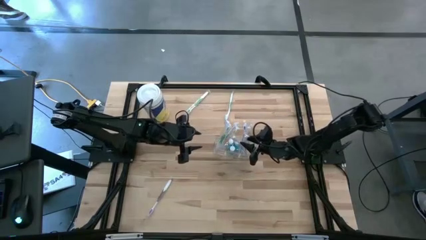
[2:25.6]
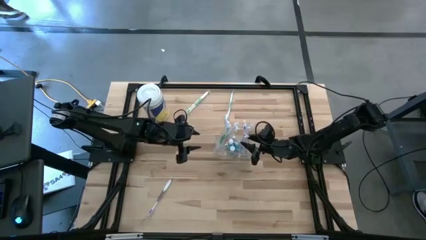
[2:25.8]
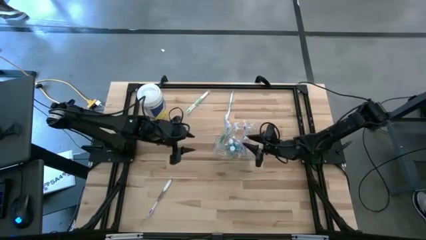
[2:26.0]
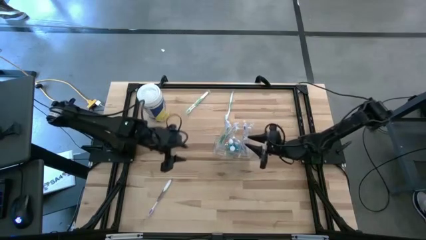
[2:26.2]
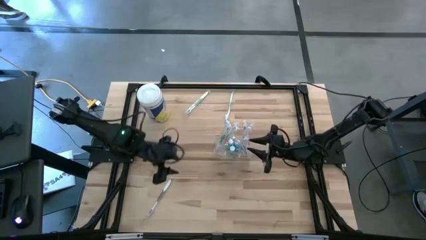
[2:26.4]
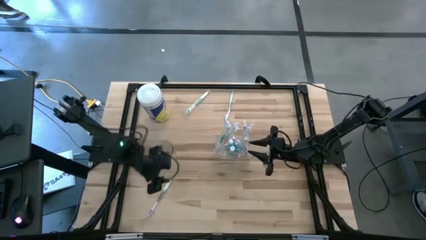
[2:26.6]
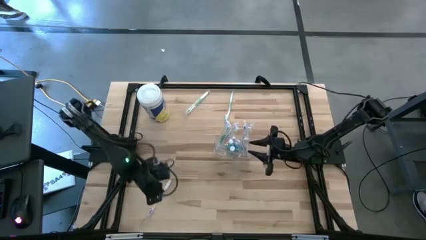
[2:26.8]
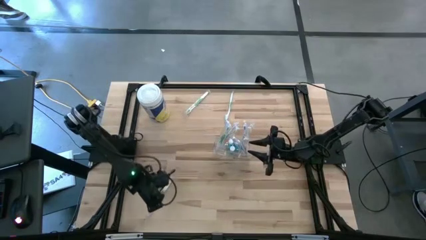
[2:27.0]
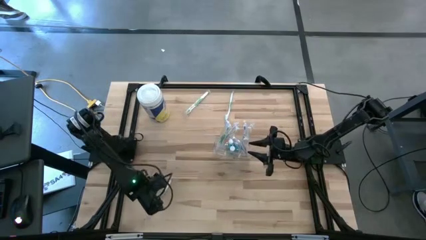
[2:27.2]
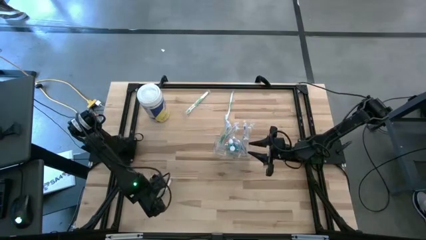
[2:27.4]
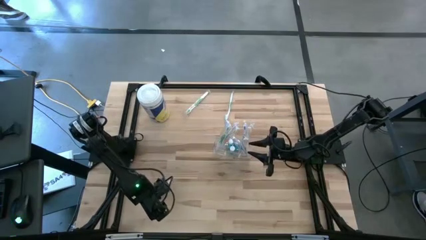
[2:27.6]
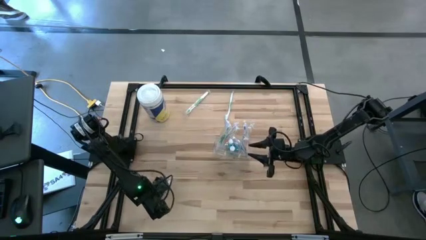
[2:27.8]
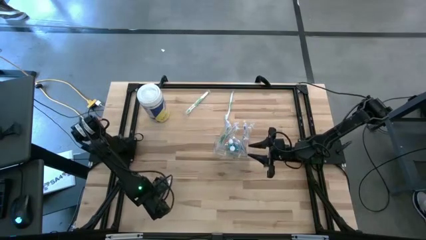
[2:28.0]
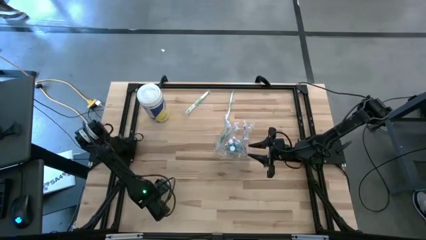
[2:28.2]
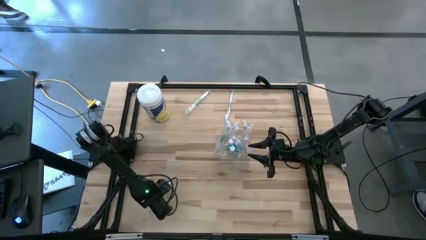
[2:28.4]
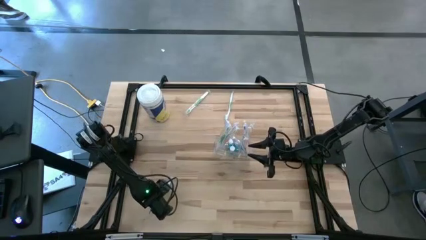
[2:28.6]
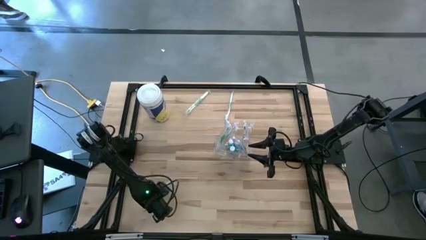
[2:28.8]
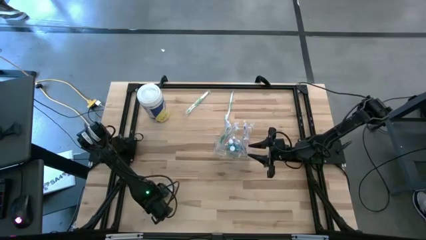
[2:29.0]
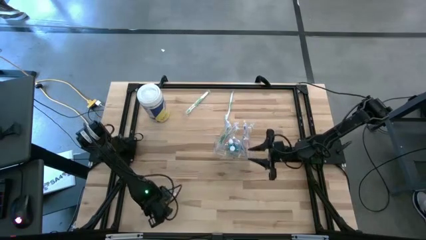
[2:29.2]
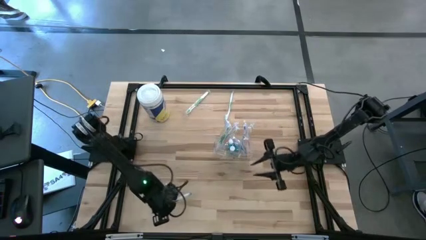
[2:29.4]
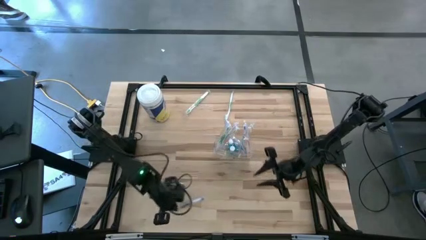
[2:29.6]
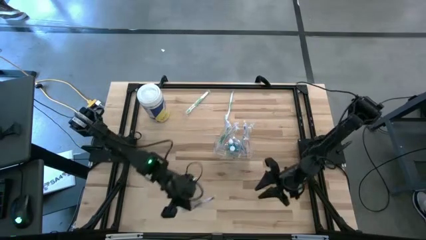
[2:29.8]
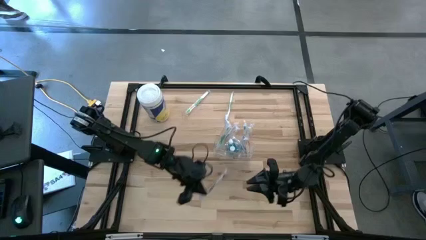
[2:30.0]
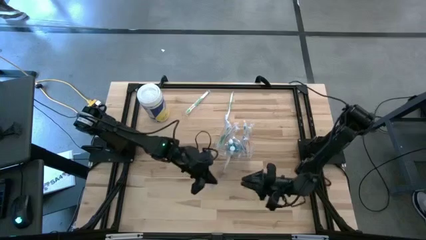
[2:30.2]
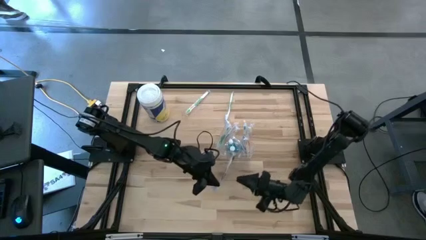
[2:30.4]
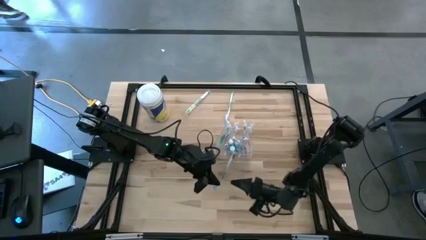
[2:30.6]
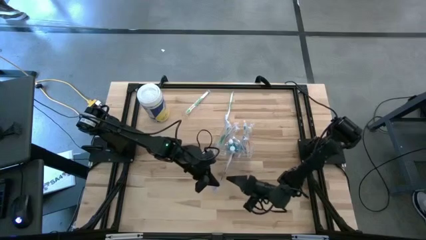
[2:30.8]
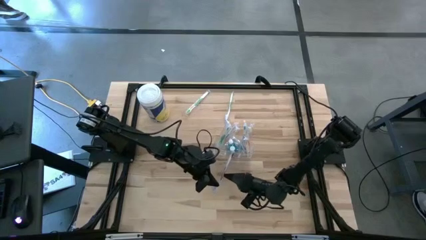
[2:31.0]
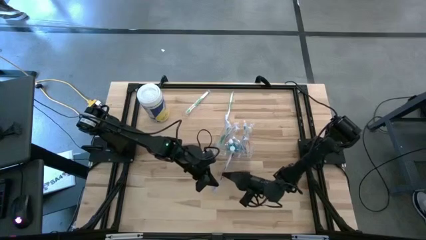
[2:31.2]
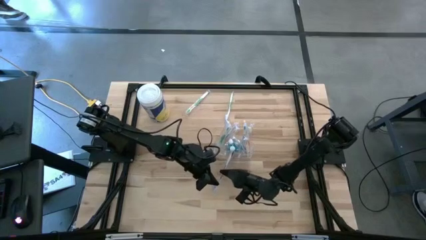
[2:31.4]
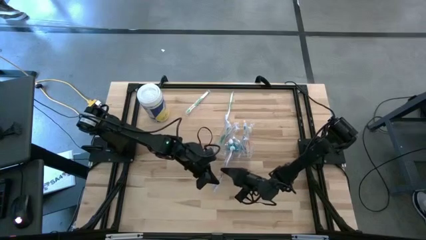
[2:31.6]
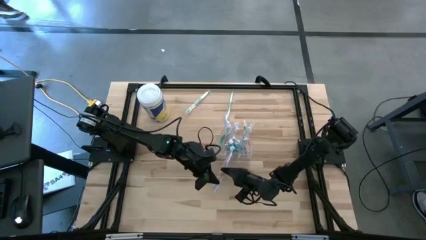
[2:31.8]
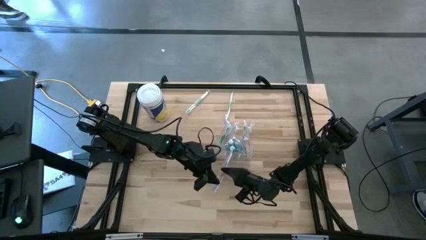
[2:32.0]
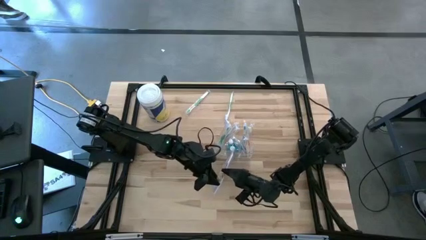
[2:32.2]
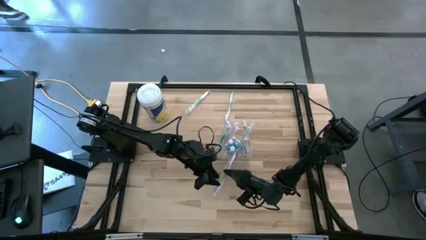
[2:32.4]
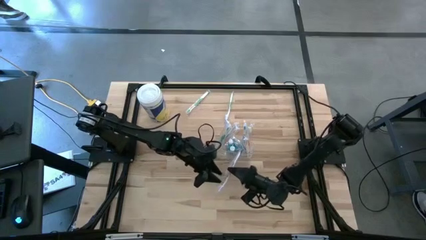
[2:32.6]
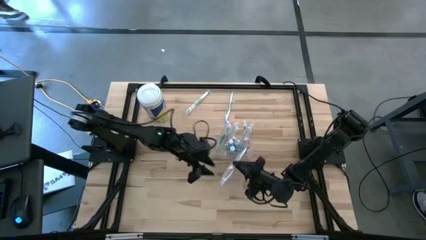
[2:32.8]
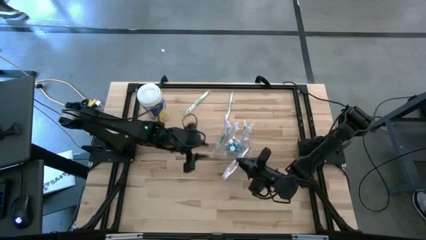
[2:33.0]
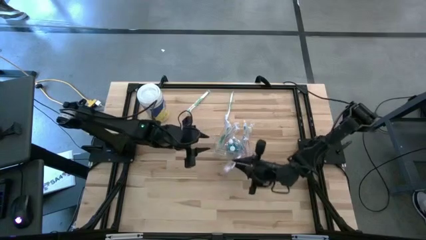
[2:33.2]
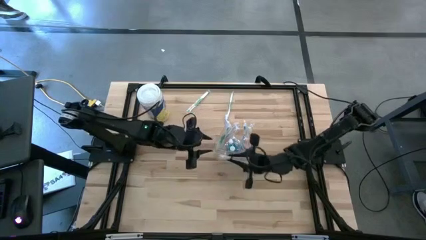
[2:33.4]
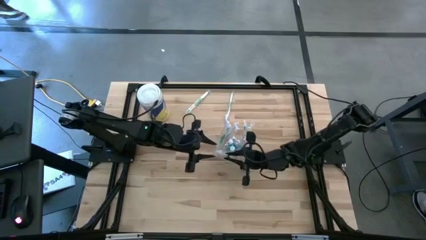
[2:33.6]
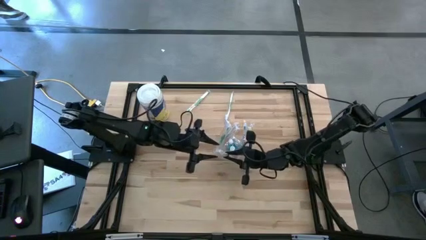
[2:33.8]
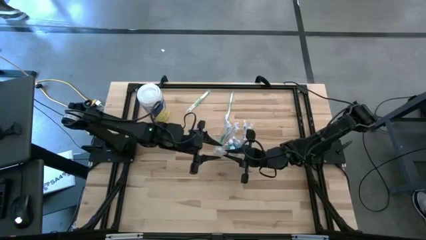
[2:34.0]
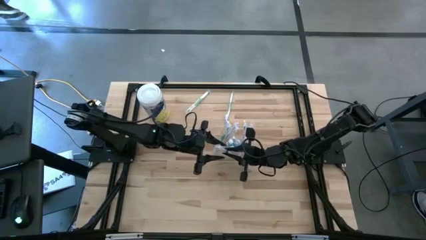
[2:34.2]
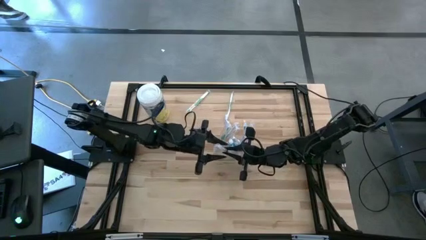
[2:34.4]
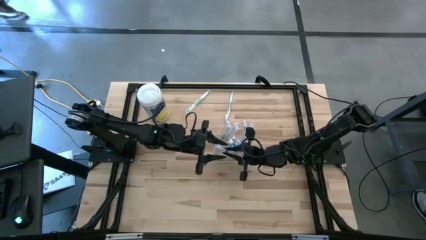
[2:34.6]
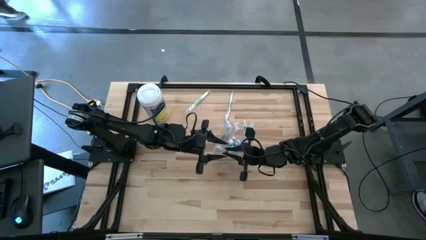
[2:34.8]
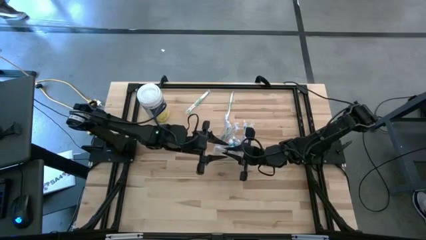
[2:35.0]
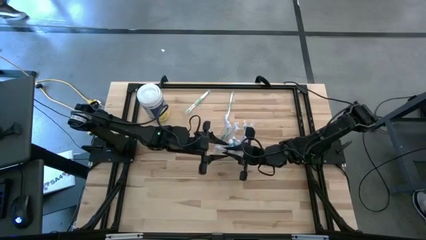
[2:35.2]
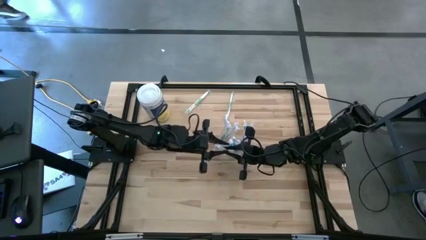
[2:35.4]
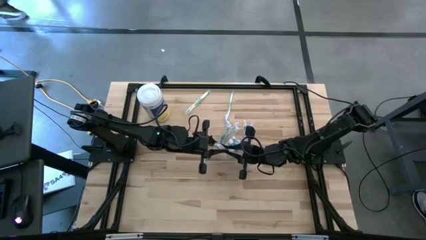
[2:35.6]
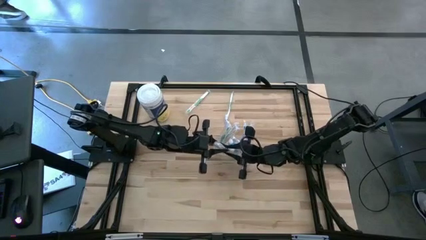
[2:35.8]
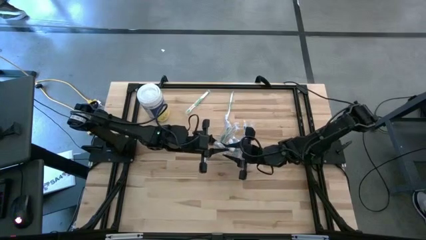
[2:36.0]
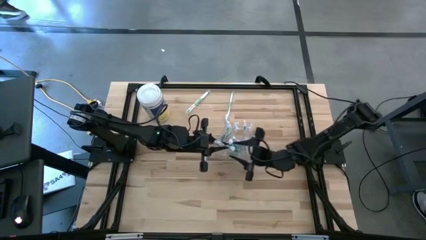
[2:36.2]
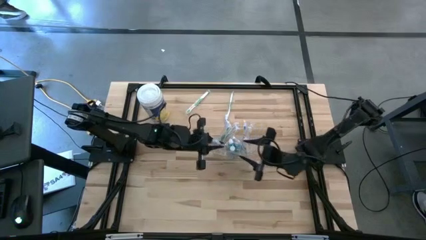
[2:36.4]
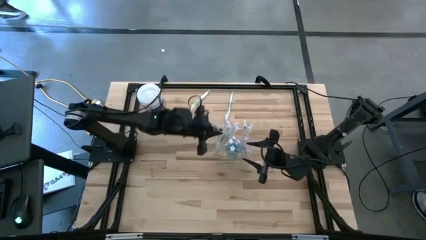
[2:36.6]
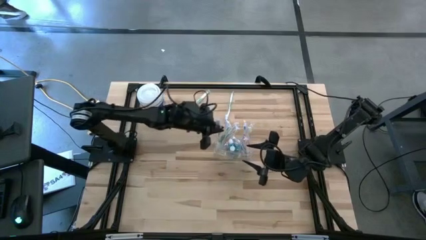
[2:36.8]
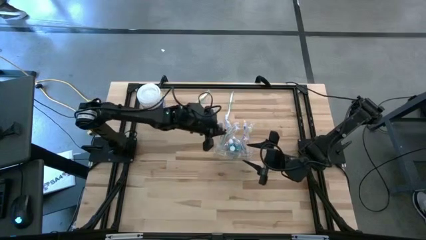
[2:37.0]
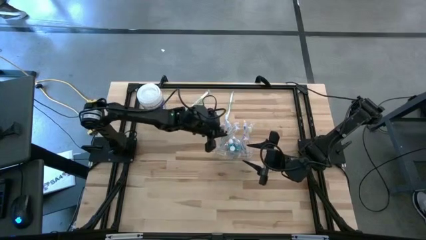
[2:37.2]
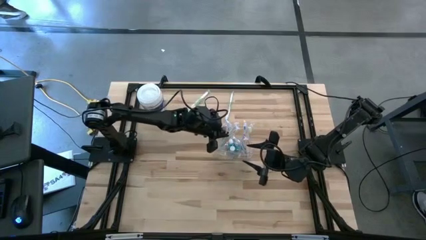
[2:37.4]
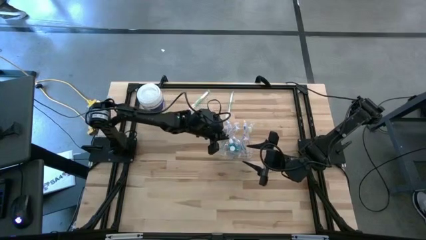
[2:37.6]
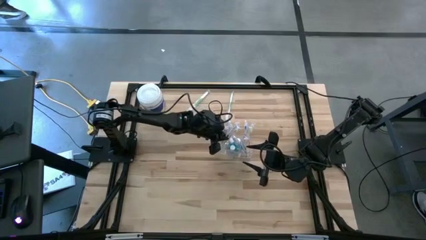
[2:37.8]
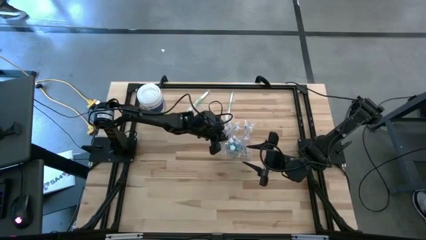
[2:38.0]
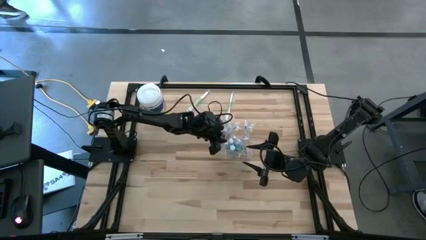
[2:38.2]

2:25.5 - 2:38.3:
Task: Pick & Place toothbrushing station
Put the violet toothbrush into the left section of the transparent organizer
